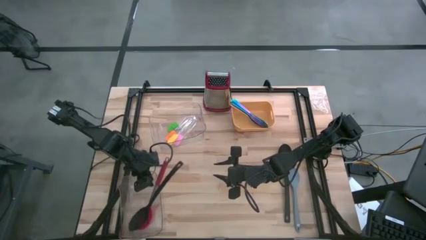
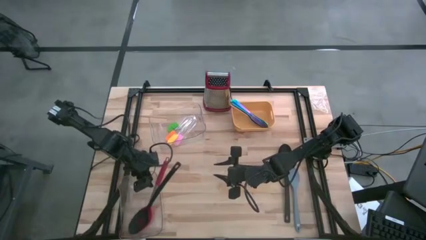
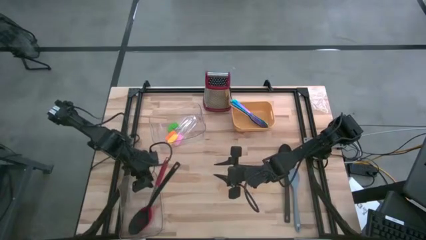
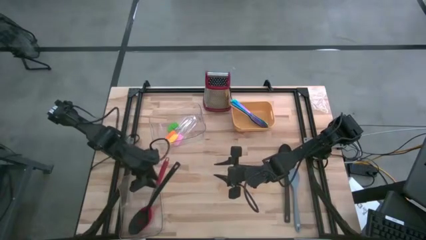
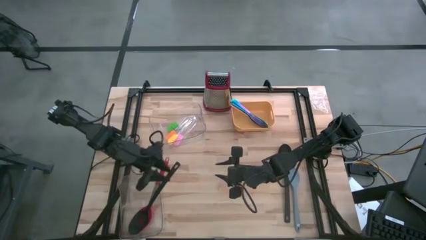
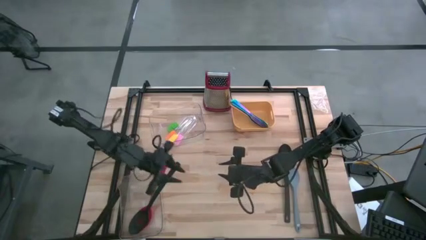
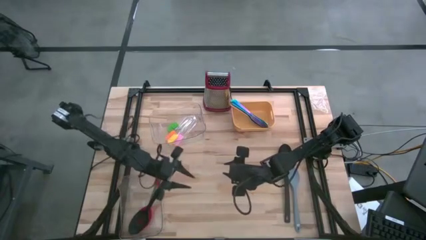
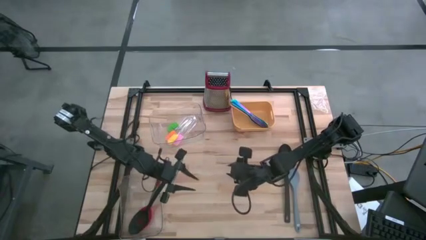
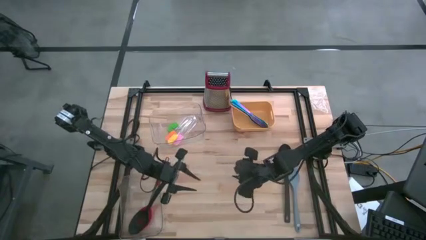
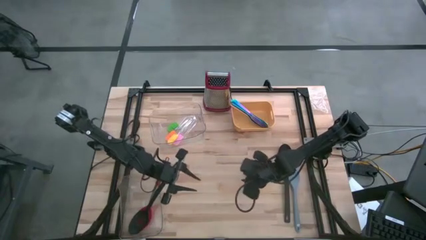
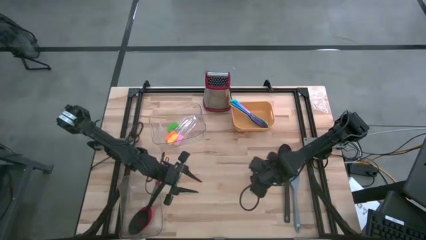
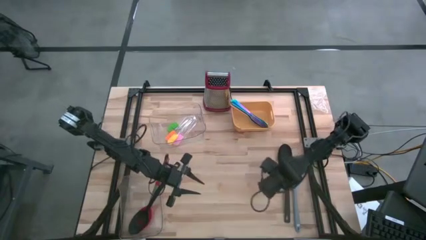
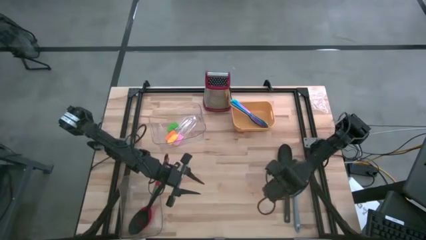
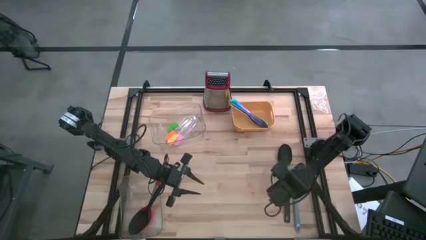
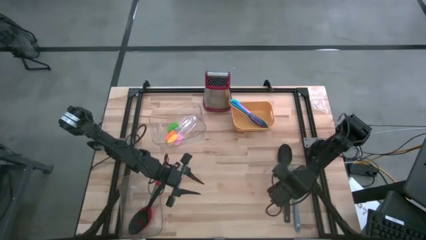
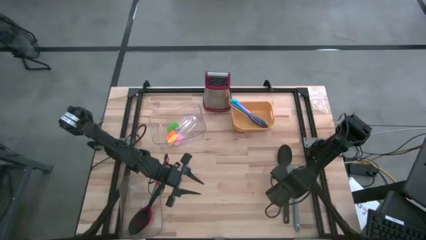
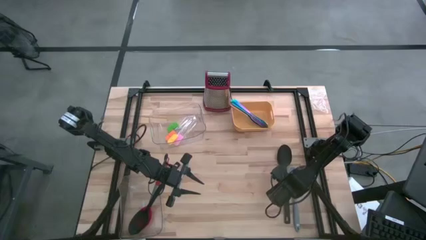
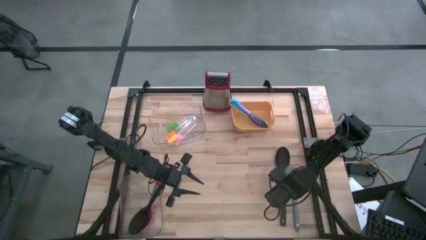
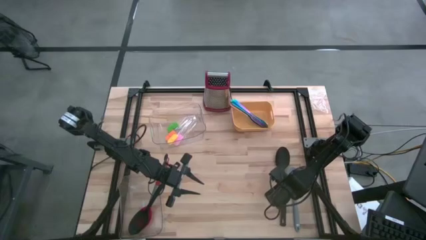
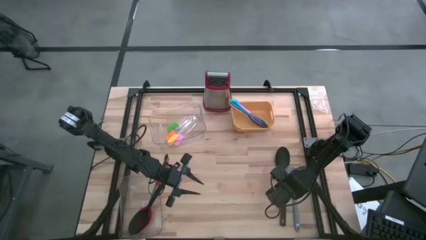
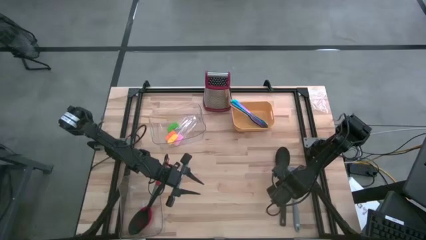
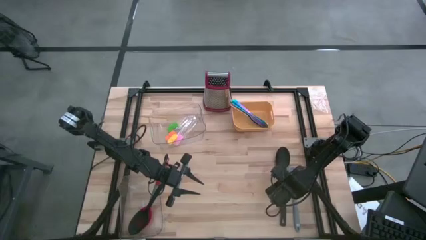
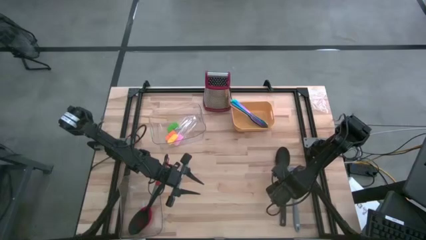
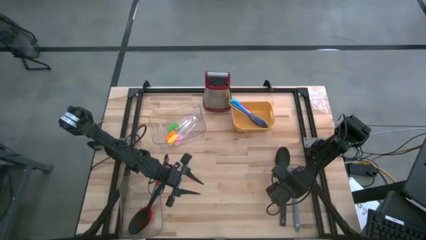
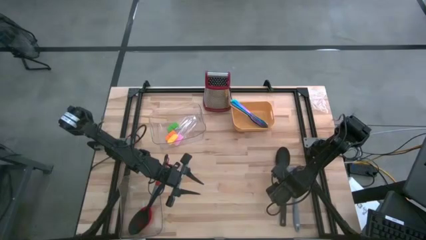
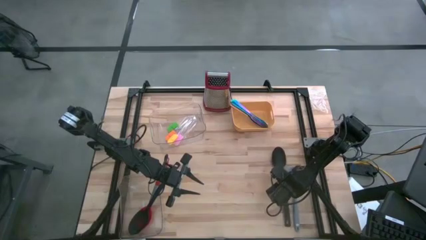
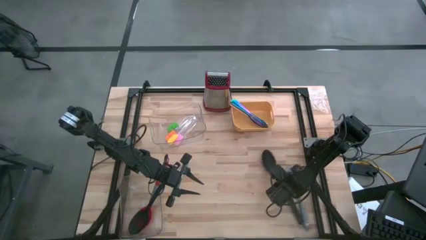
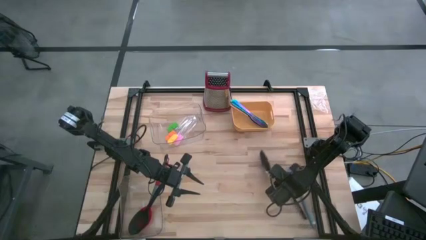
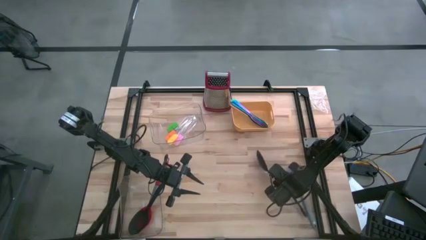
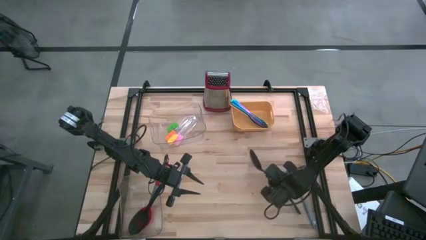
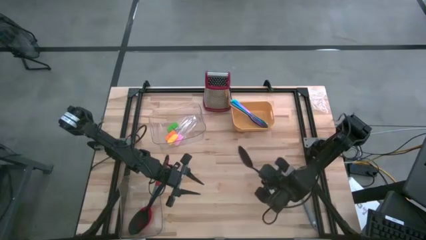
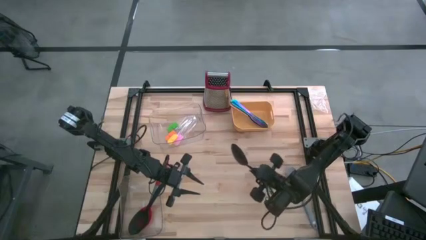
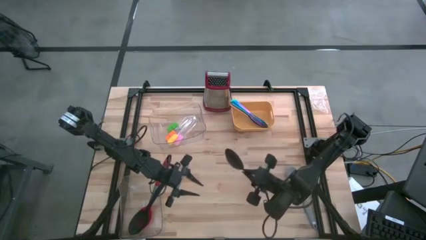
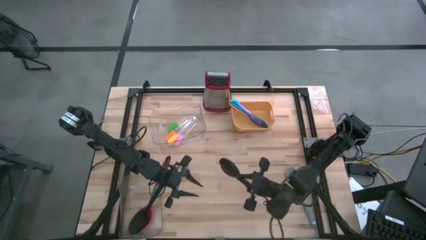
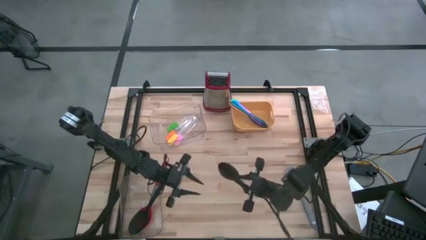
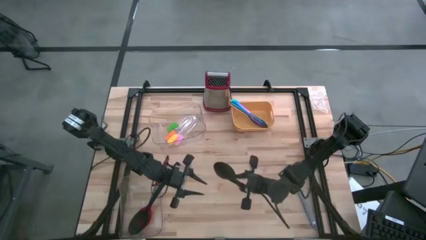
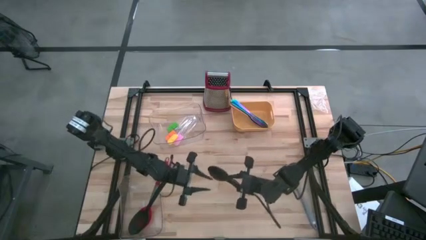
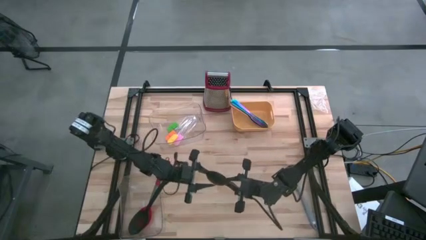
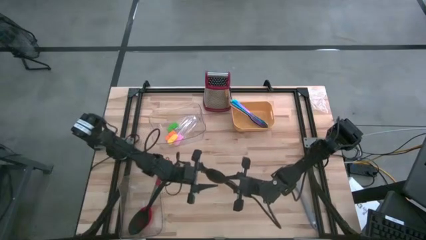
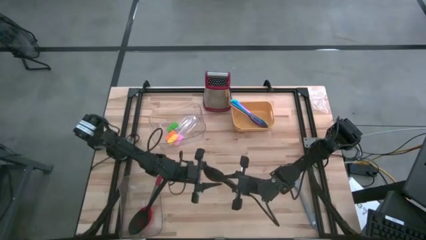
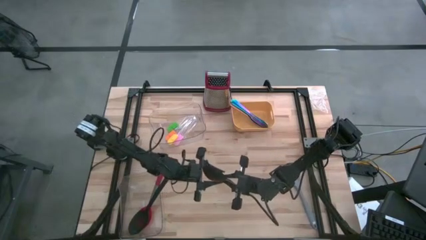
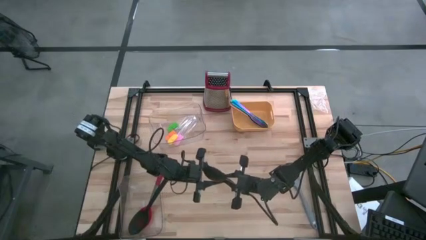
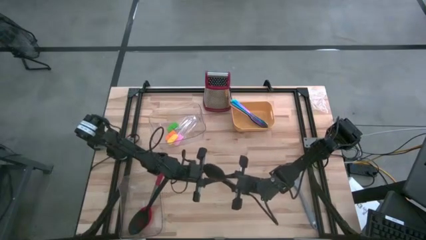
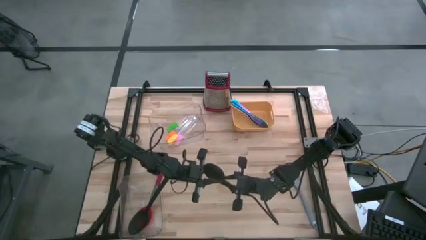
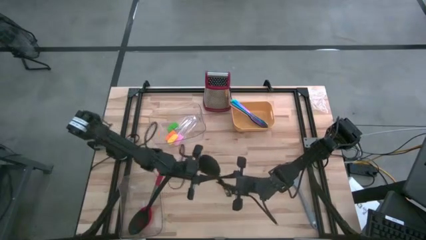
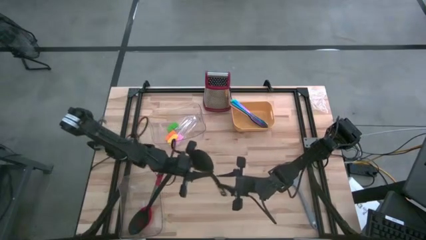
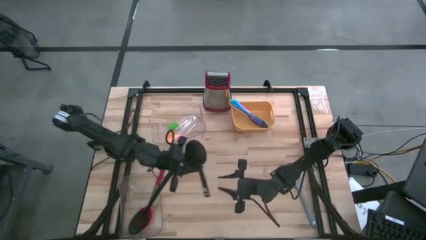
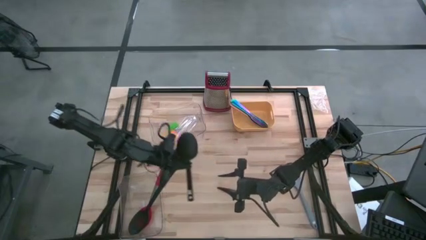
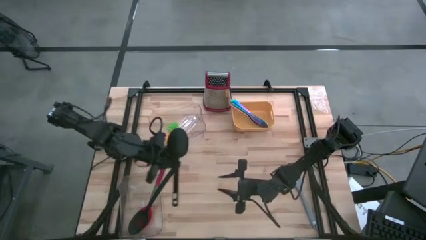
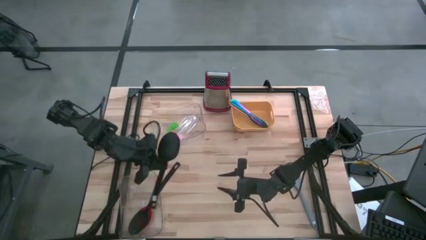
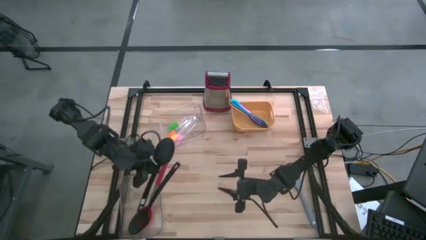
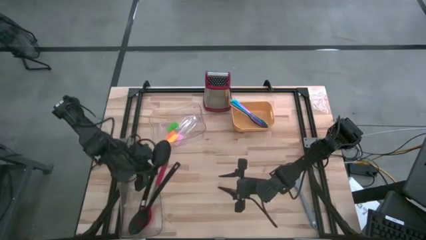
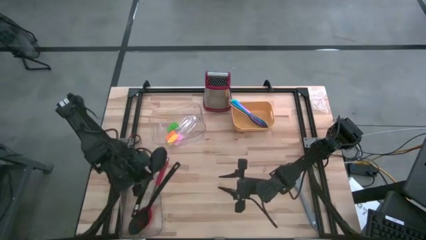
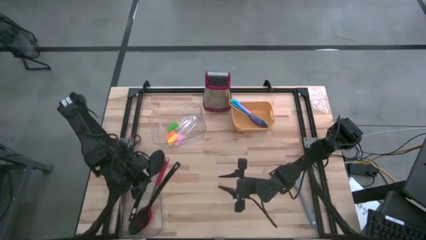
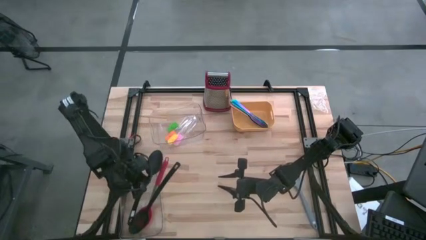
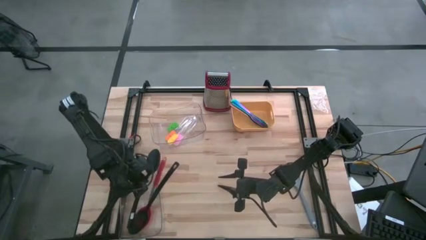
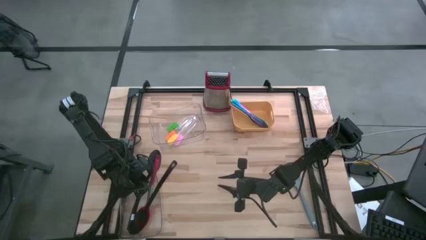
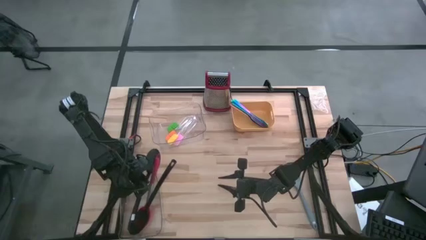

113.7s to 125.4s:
Task: Pick & Place Kitchen Items
Put the black serving spoon into the bottom transparent bin
